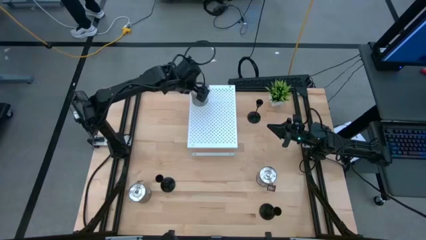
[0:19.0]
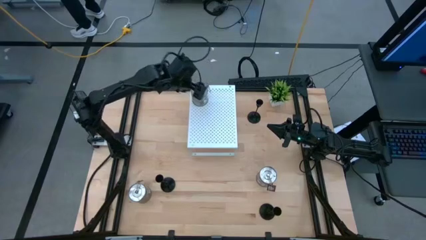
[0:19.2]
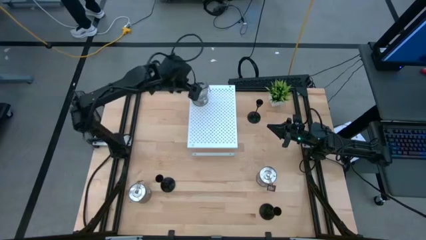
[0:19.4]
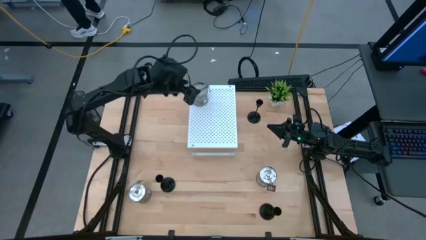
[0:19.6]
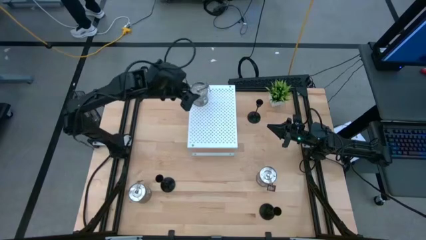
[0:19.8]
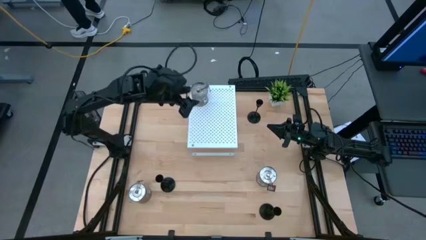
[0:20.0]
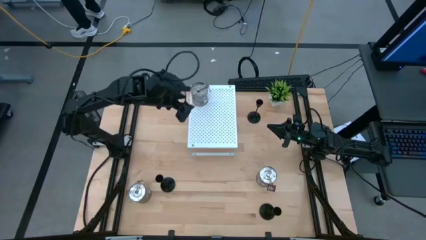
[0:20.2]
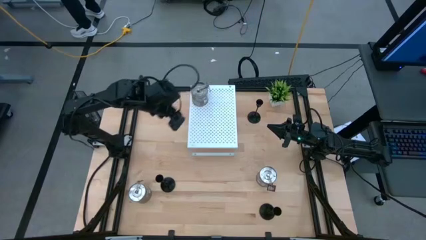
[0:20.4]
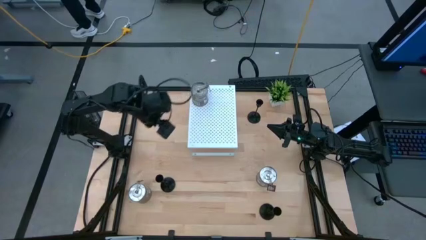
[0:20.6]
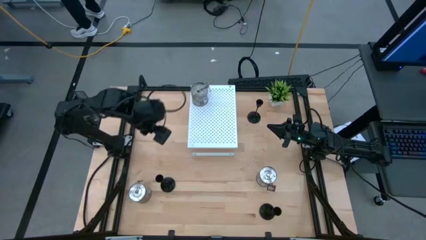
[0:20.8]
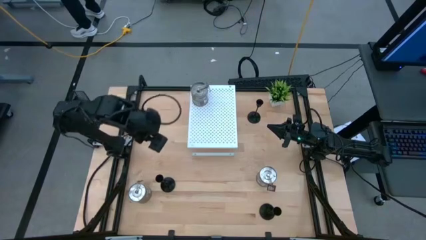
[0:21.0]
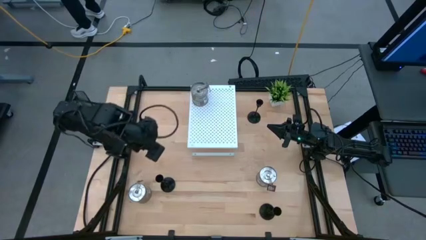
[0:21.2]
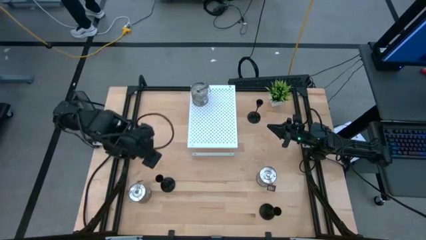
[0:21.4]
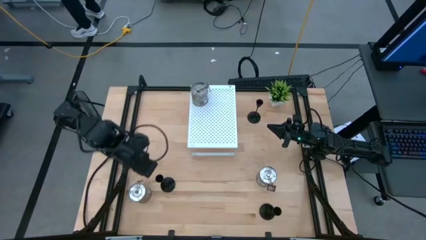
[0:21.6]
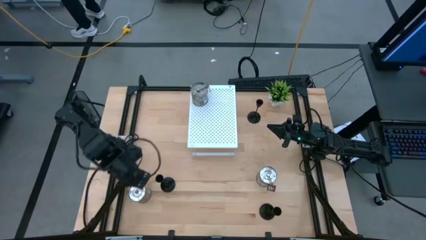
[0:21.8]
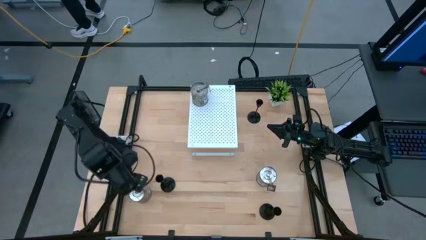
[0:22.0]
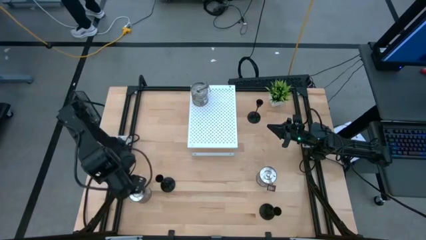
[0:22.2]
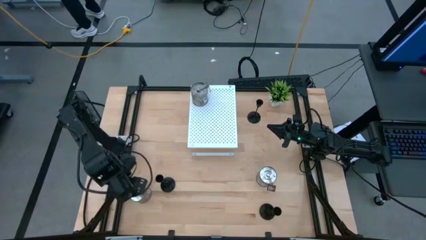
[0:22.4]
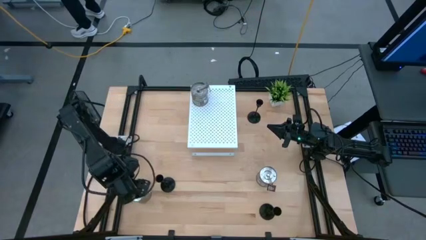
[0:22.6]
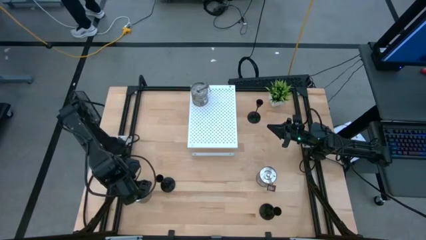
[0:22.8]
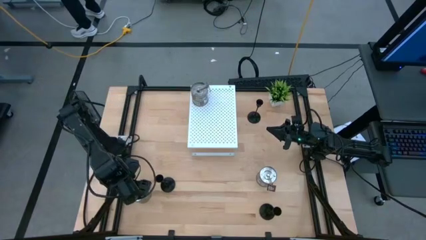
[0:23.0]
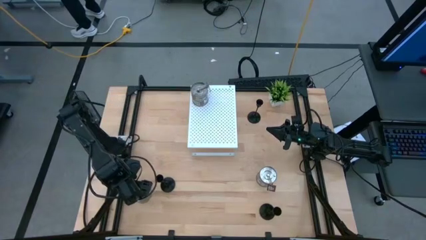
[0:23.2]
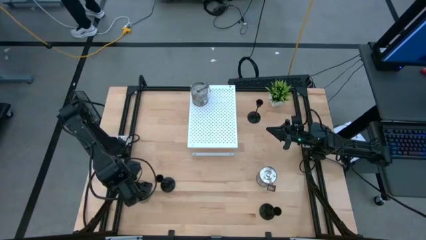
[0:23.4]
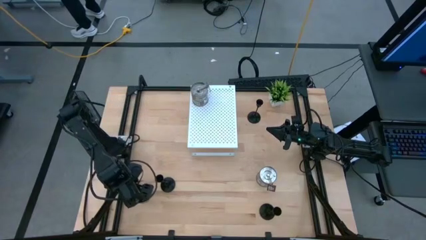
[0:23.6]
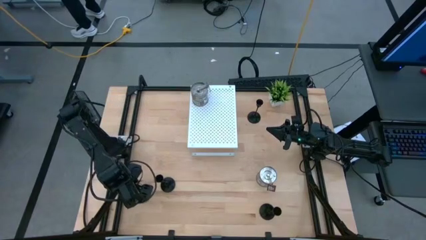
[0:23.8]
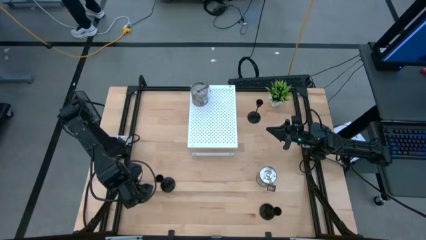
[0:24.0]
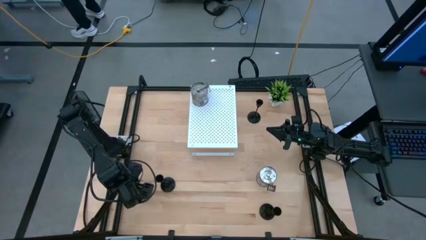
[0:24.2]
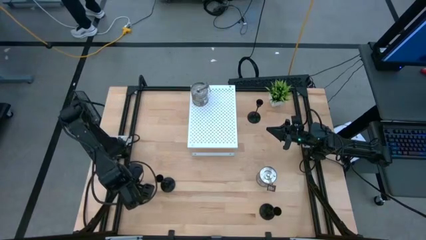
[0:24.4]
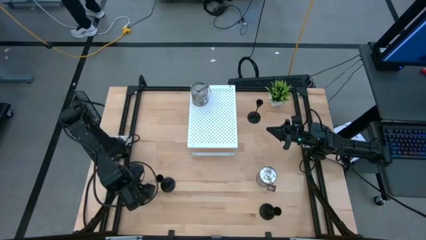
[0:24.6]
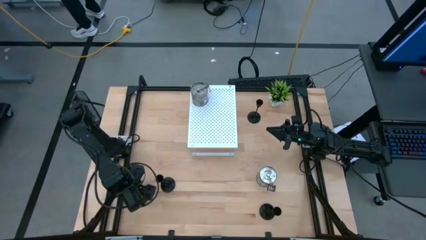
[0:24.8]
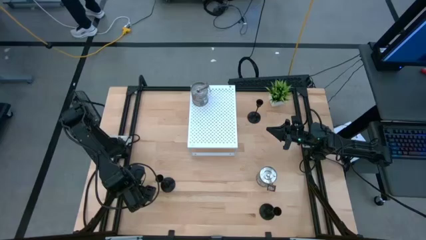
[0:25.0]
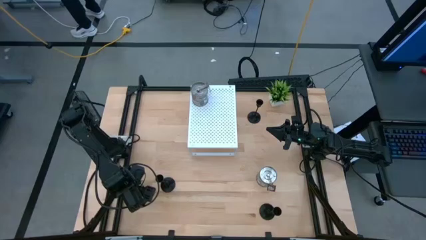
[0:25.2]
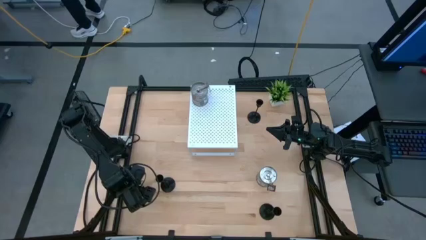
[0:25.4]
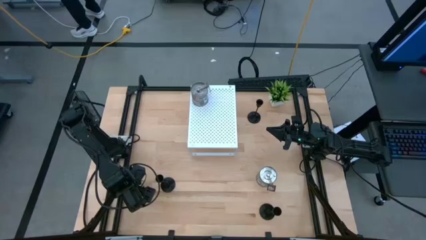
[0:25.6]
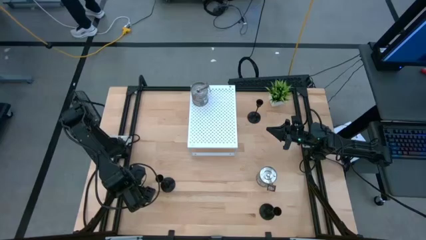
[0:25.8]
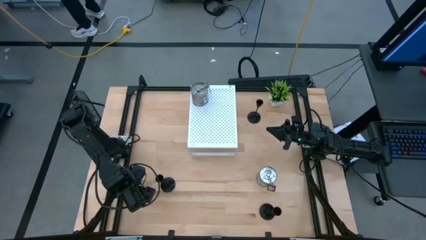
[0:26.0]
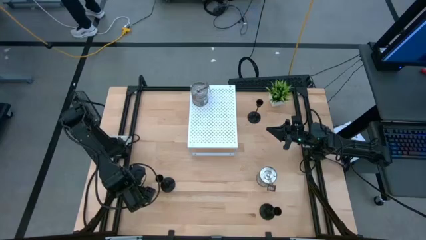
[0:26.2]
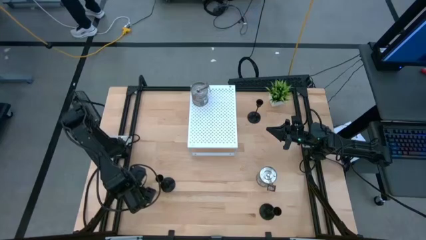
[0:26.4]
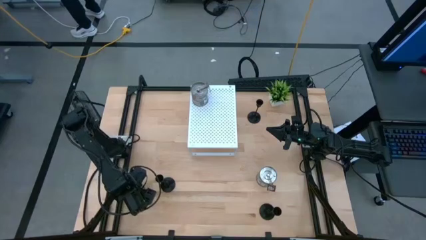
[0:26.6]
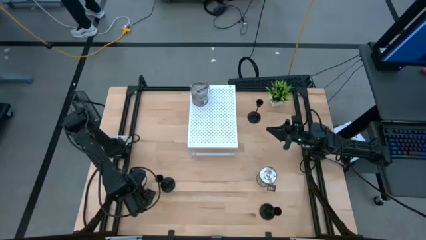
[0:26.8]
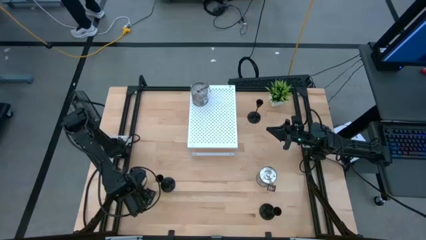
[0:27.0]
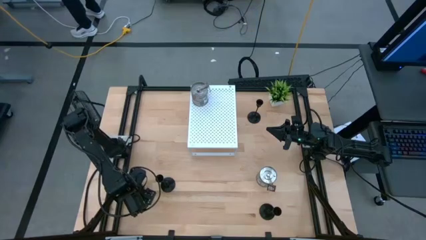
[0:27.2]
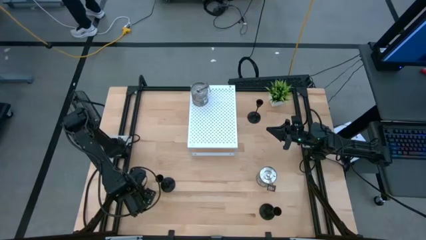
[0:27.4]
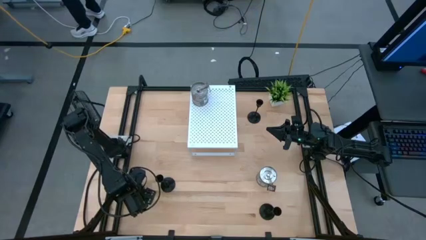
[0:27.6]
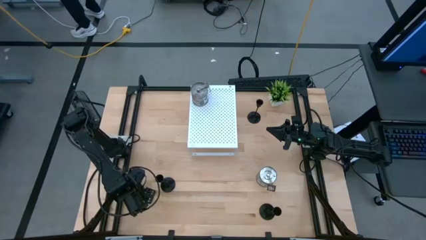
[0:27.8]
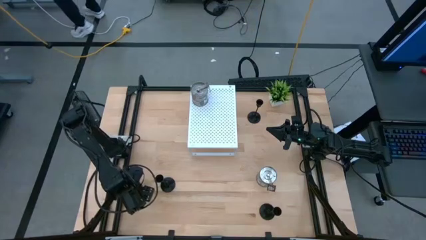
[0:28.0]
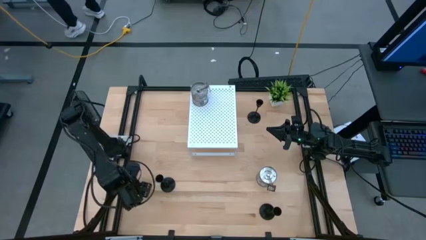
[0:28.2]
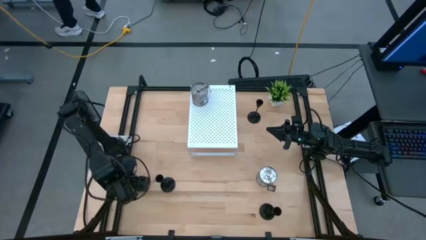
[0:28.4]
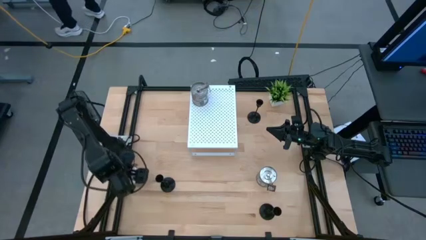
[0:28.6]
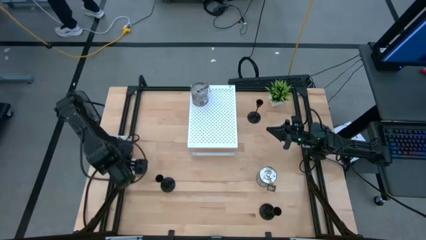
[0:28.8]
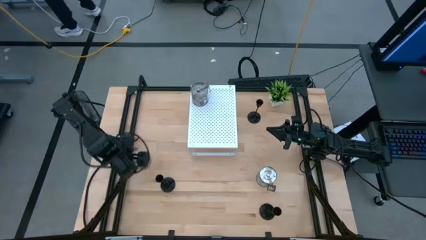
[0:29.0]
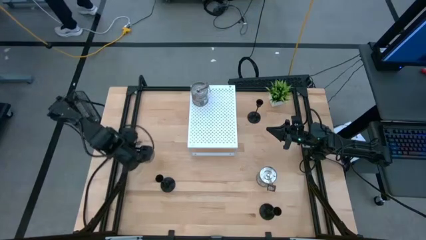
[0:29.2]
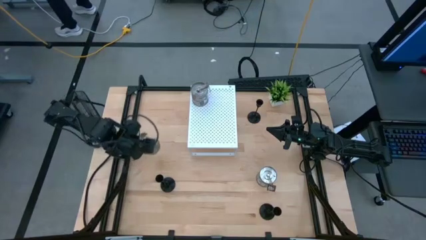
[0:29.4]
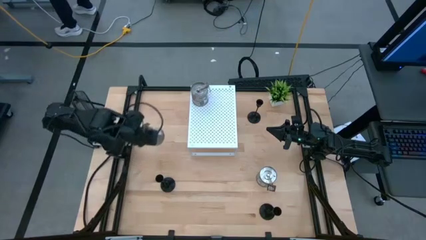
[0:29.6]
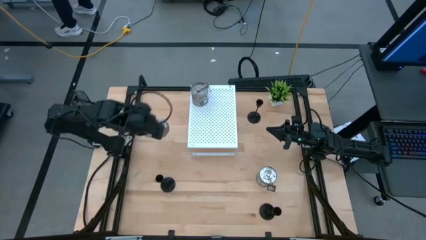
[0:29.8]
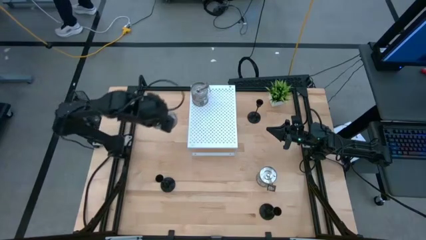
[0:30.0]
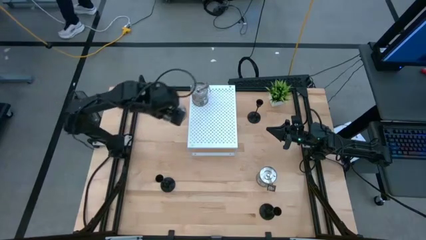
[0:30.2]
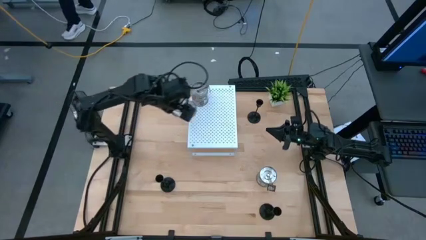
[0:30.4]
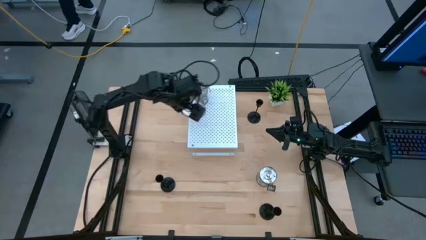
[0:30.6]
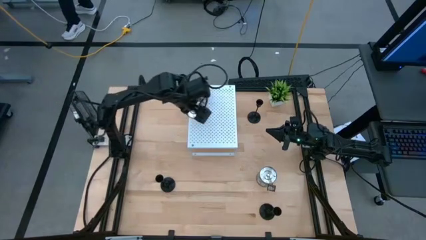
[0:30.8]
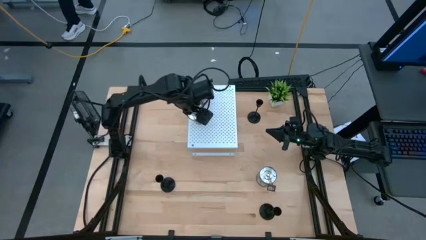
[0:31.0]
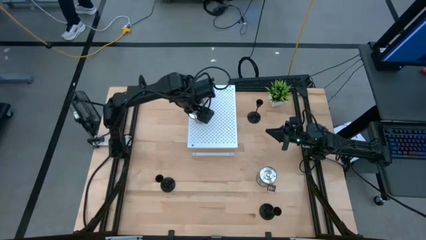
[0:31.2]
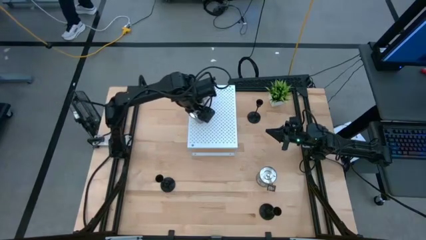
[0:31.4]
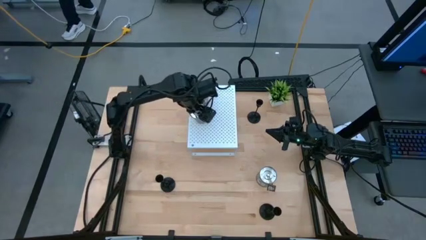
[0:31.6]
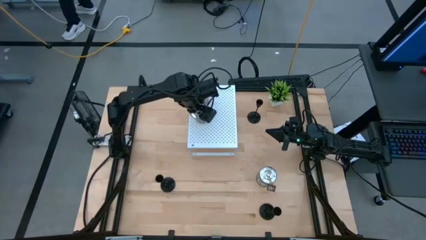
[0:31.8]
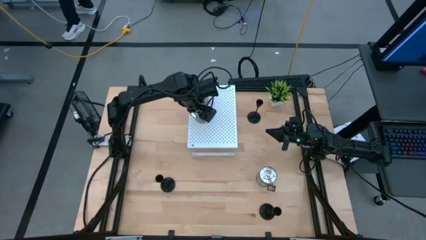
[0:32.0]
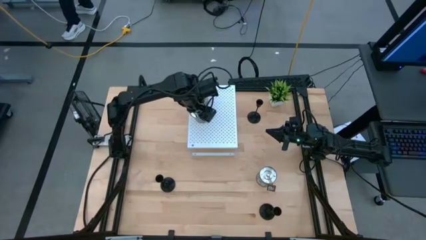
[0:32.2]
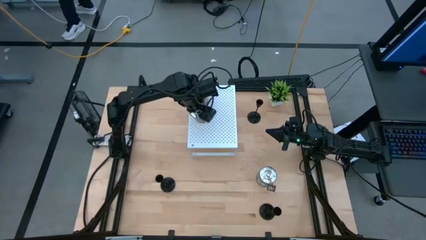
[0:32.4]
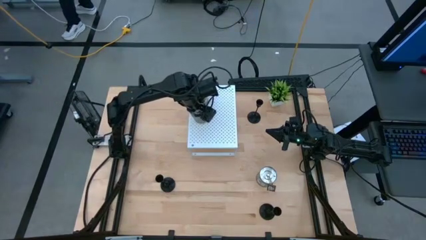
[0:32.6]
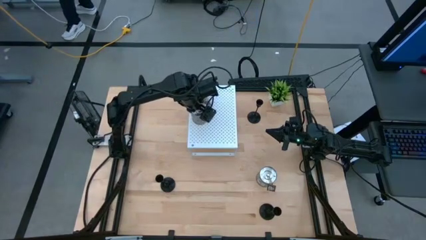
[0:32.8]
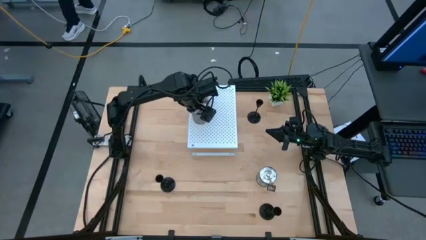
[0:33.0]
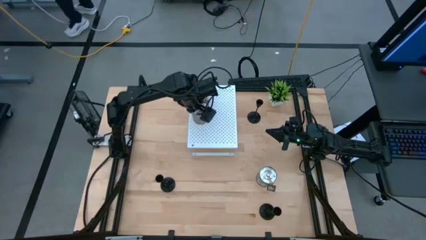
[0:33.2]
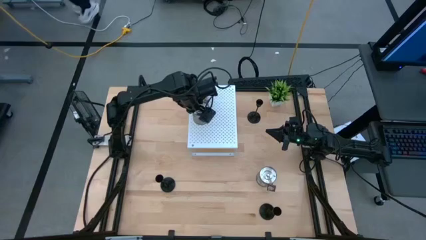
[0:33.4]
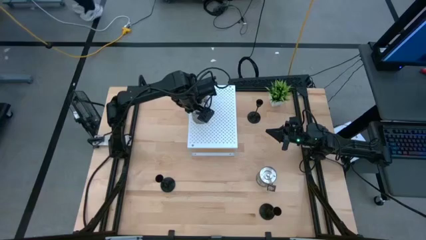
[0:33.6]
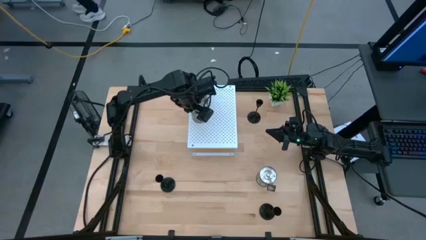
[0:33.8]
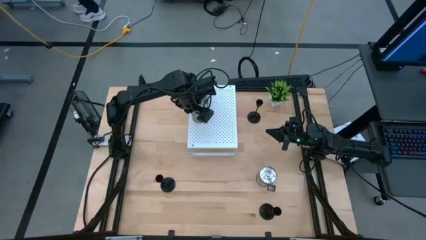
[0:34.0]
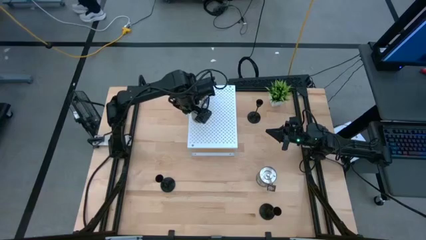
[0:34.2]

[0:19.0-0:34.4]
Task: Pick & Place candle stick holders
Put the left silver scented candle on the shelf aligned with the other silver scented candle
